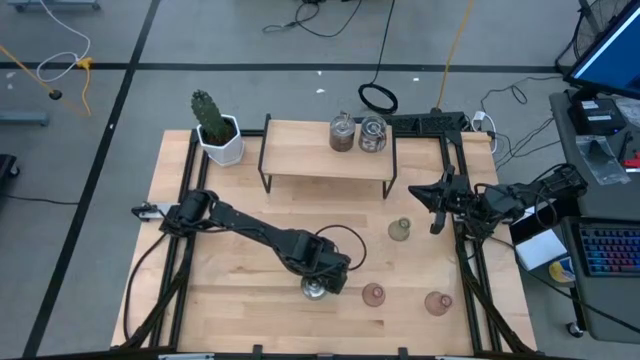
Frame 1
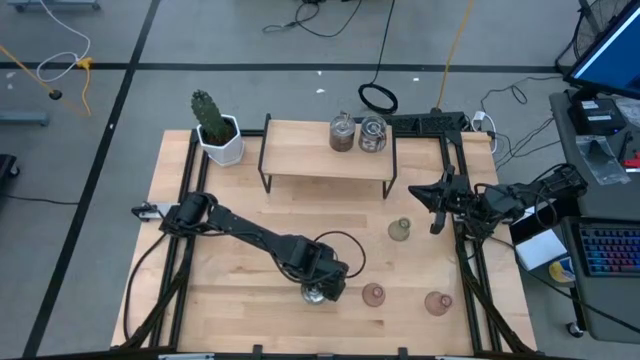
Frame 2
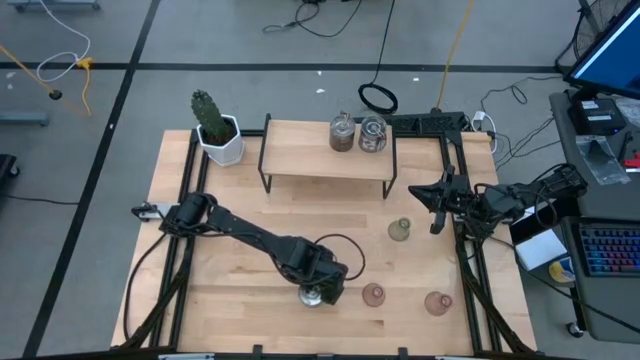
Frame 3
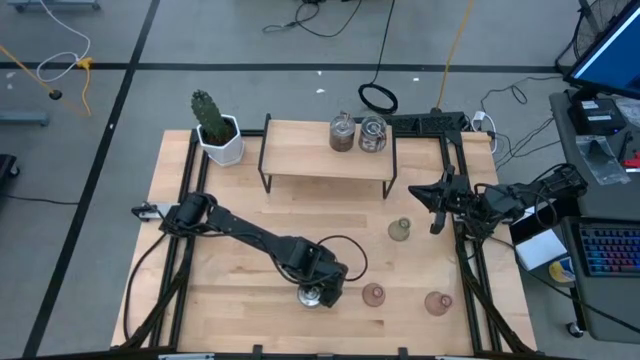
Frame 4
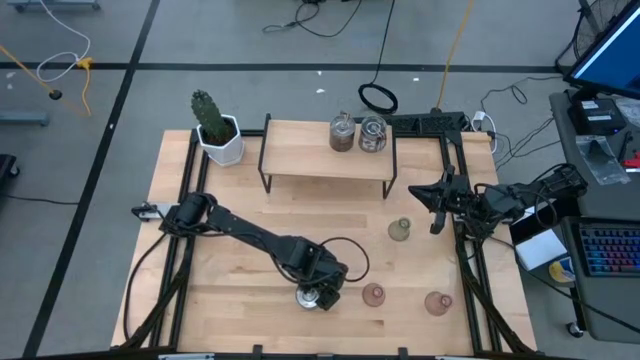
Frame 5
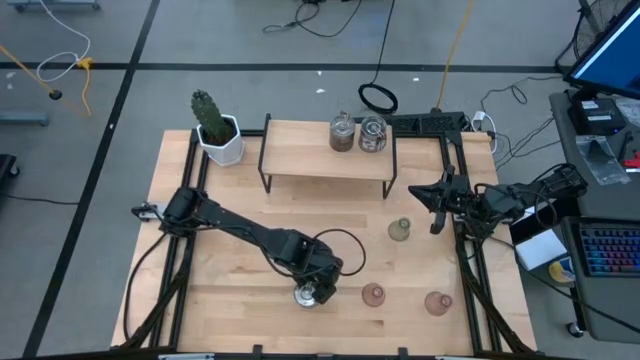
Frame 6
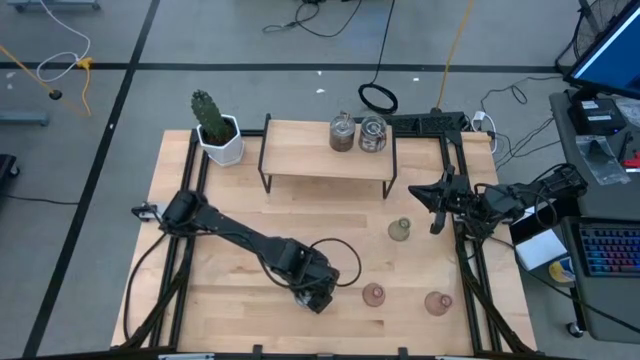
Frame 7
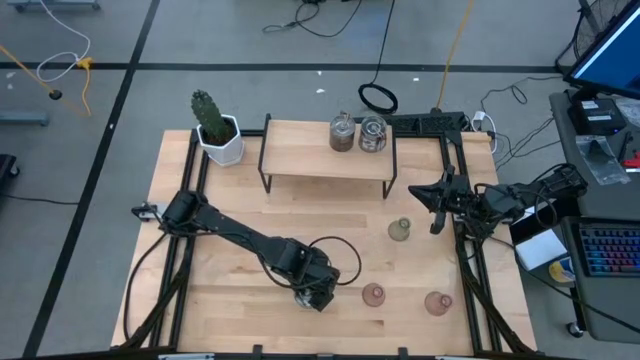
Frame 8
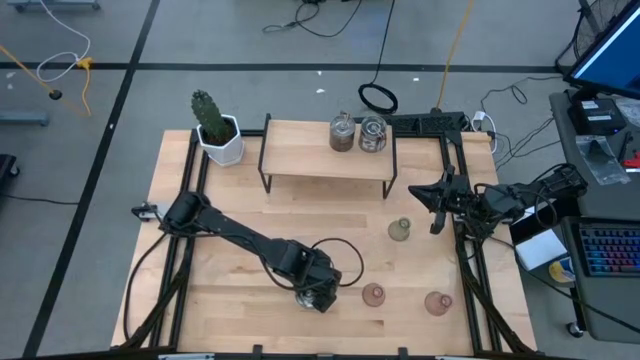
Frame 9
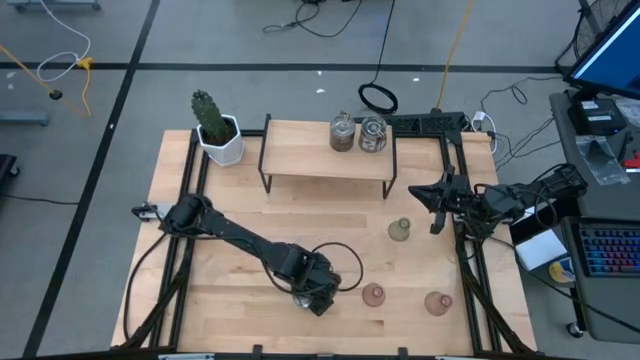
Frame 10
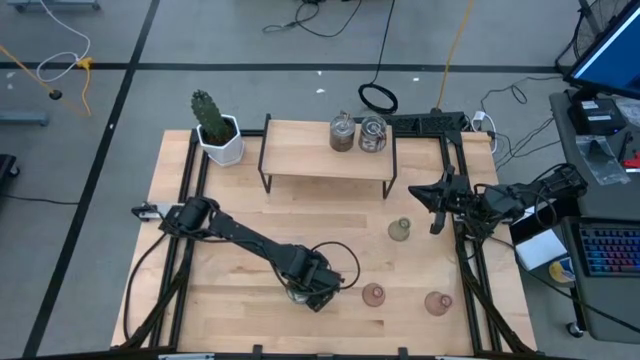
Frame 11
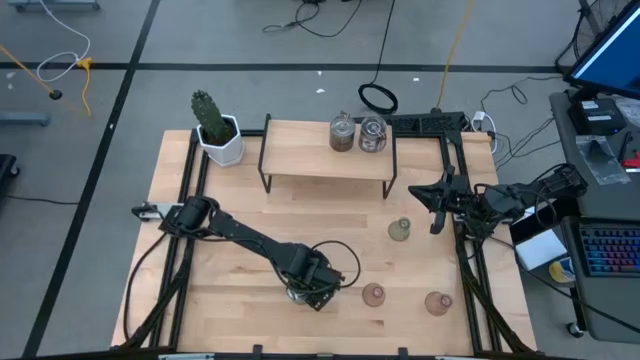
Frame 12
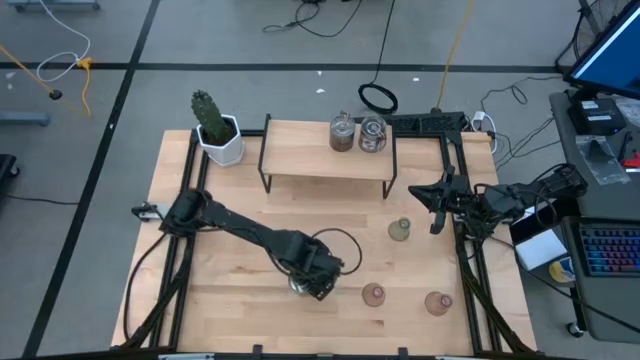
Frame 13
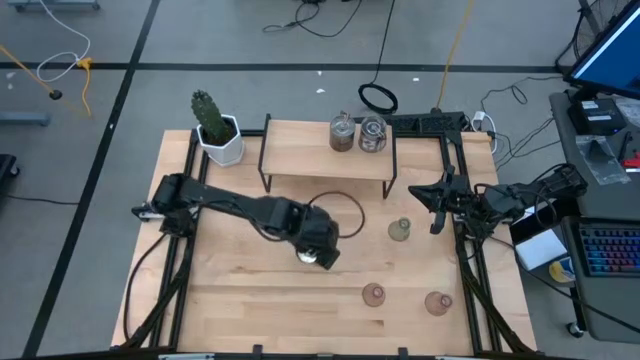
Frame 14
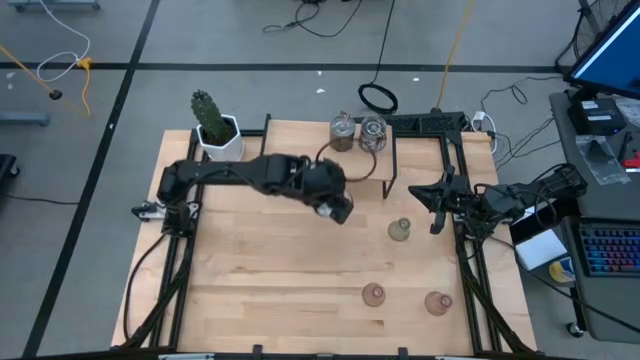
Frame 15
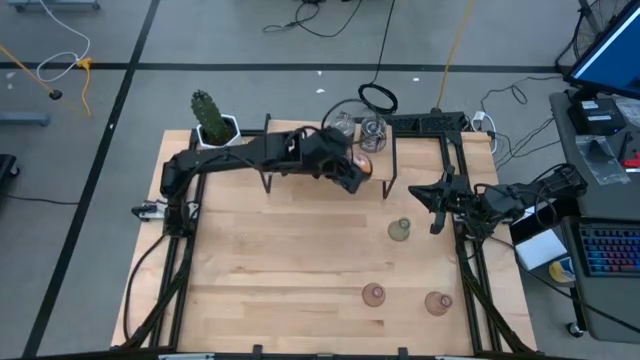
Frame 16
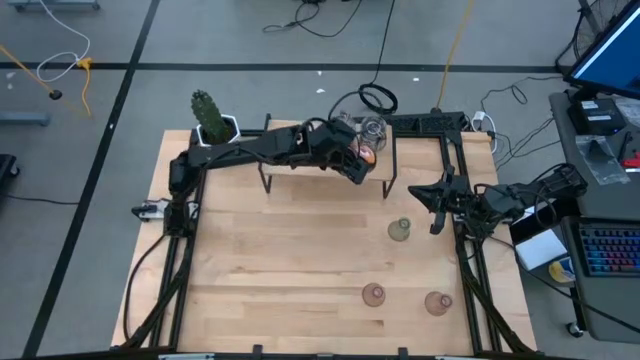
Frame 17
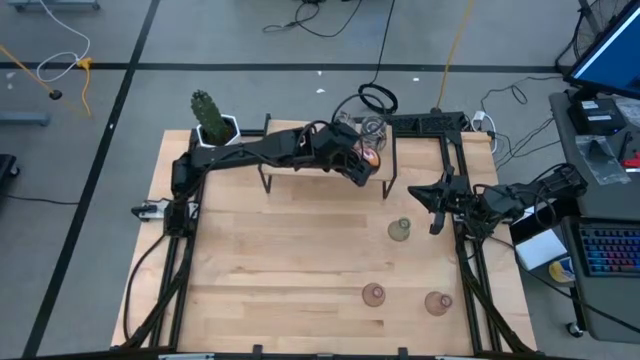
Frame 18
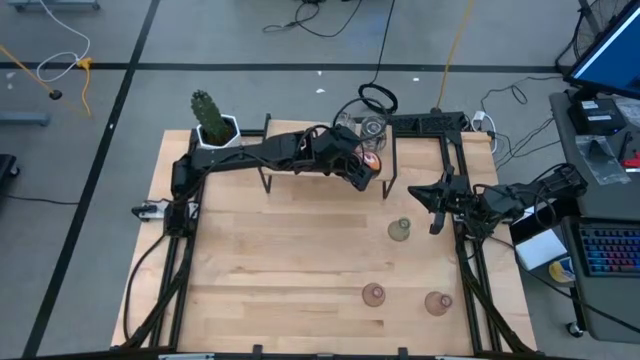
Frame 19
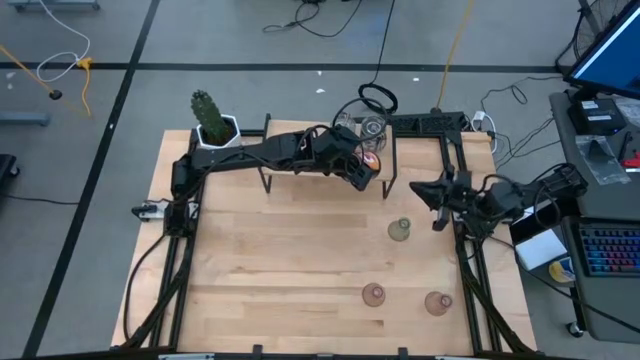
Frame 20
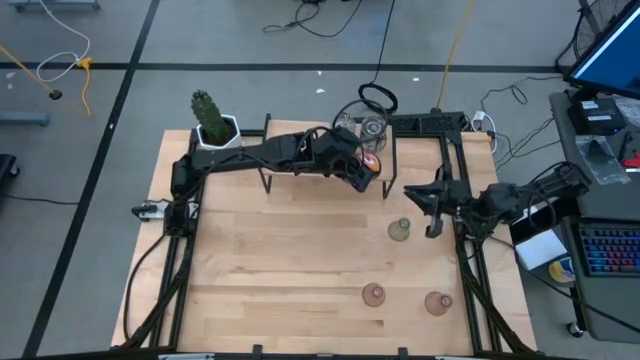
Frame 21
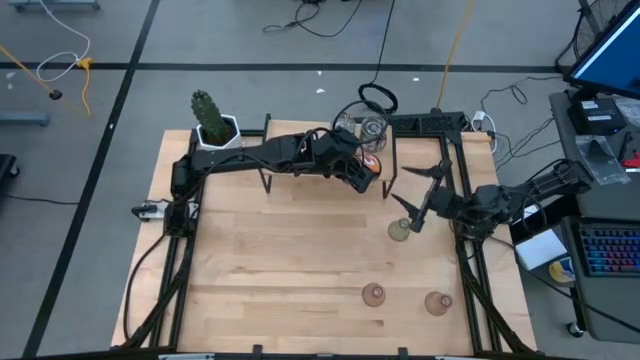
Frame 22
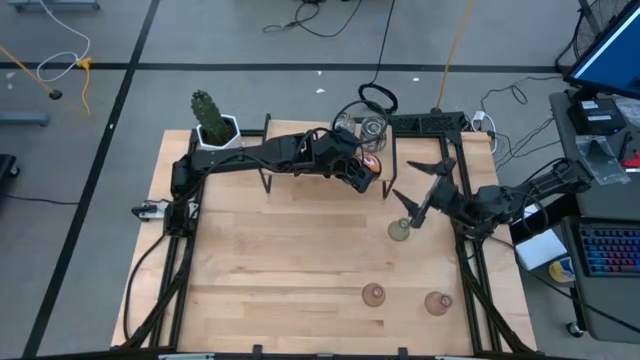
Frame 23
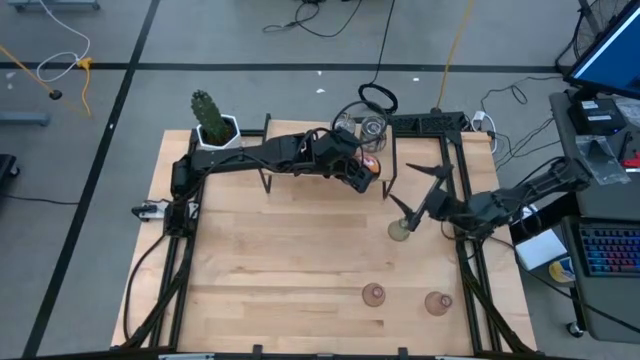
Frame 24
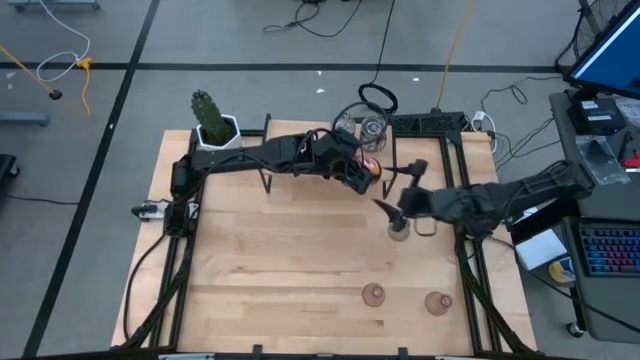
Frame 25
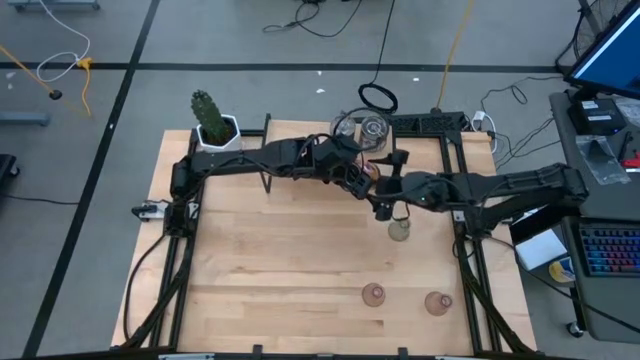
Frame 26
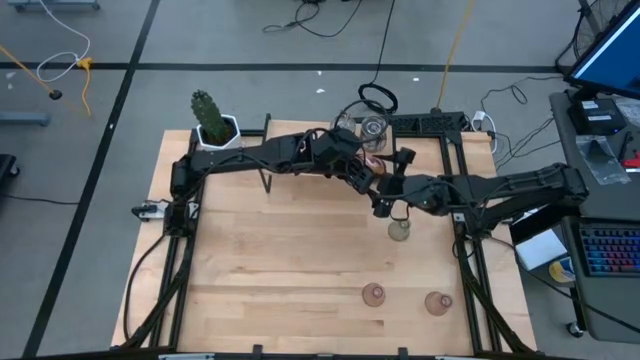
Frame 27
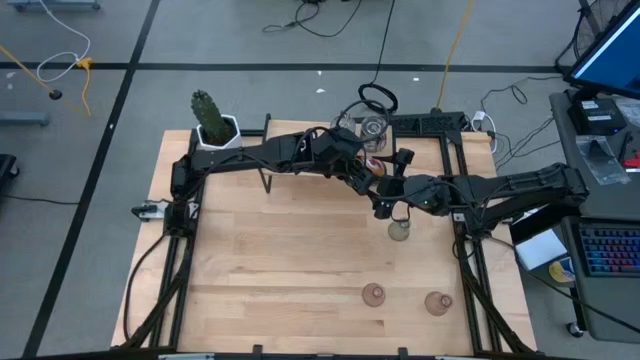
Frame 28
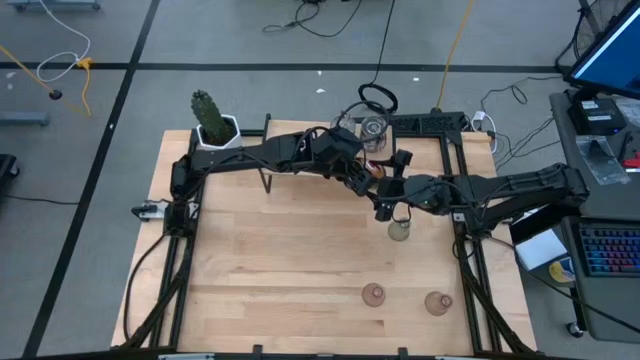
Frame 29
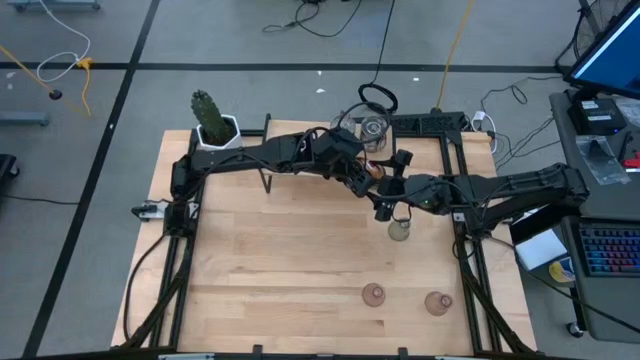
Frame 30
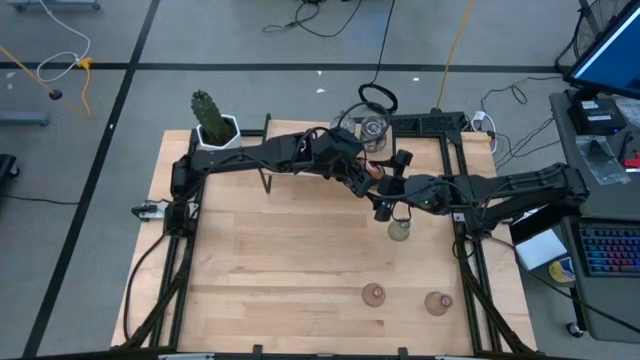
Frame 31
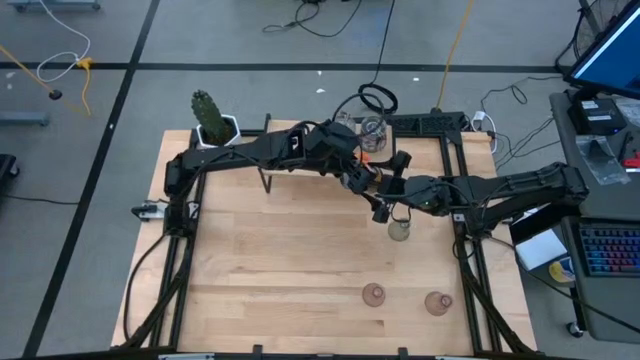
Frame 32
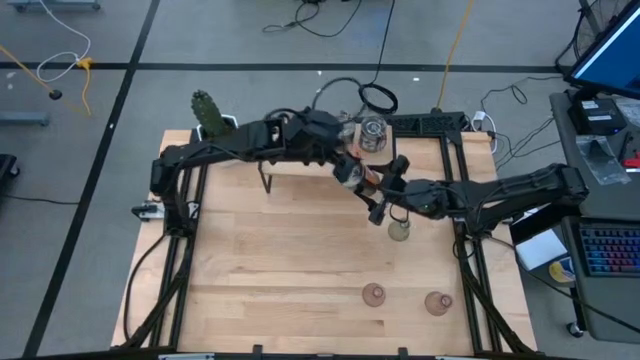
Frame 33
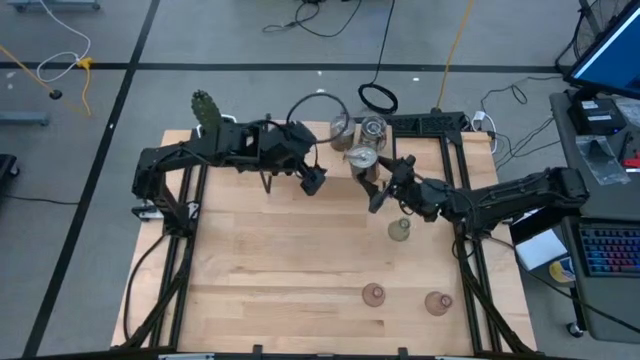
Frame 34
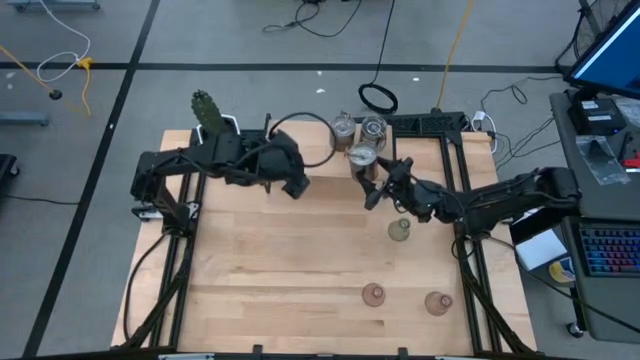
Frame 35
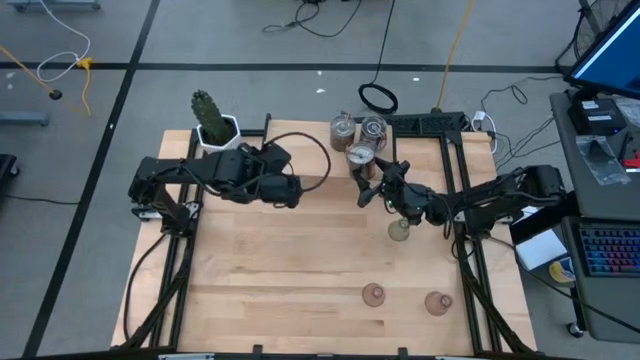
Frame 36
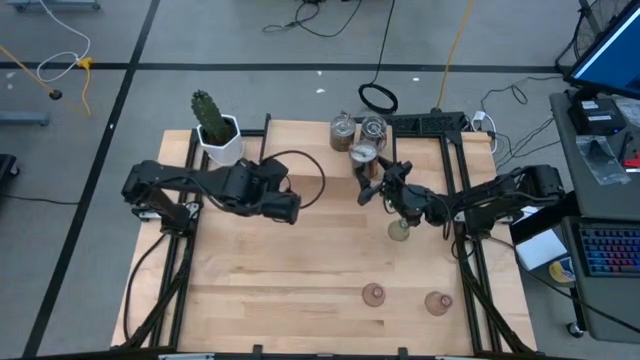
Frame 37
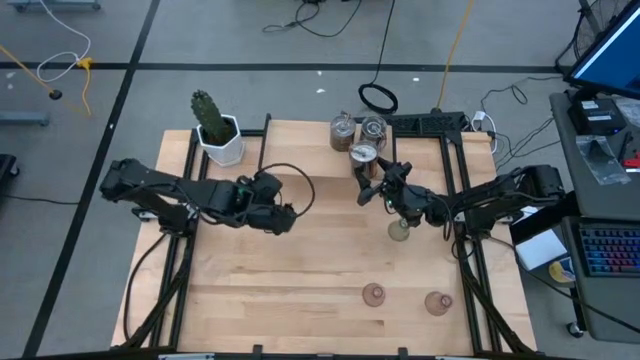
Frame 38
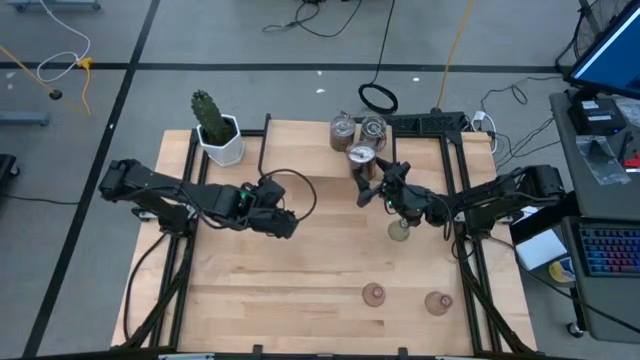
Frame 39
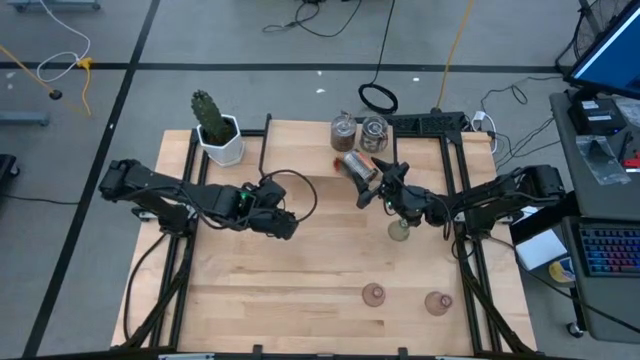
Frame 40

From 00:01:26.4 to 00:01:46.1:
Task: Pick & Place candle stick holders
Put the silver scented candle on the shelf

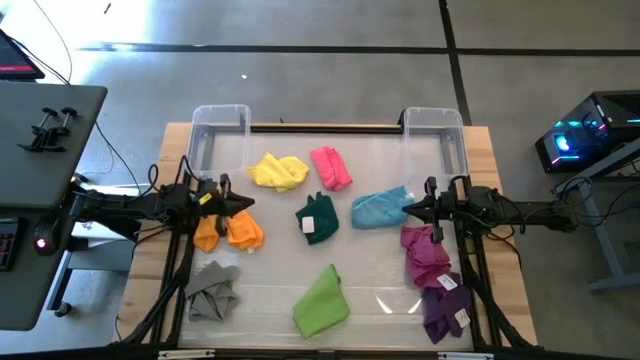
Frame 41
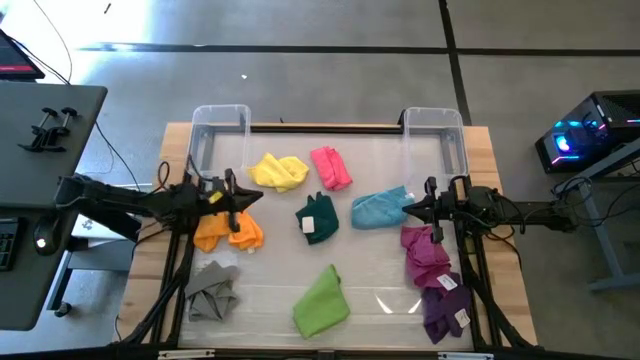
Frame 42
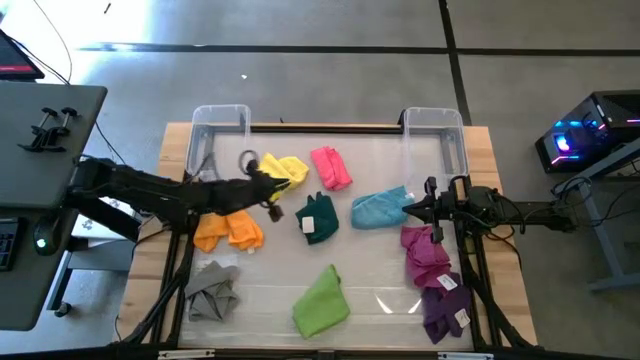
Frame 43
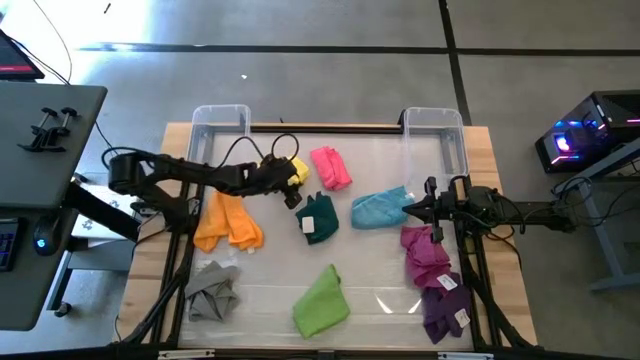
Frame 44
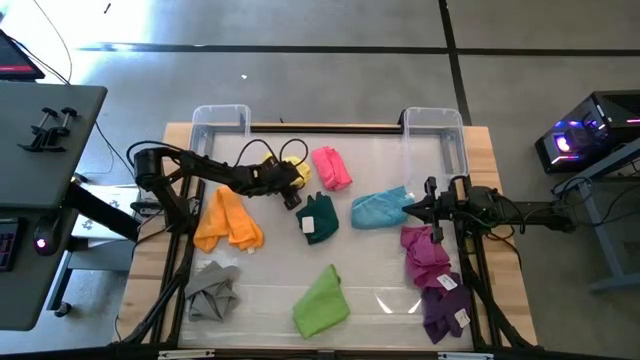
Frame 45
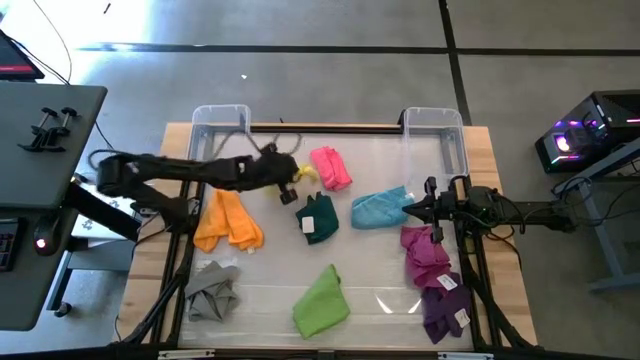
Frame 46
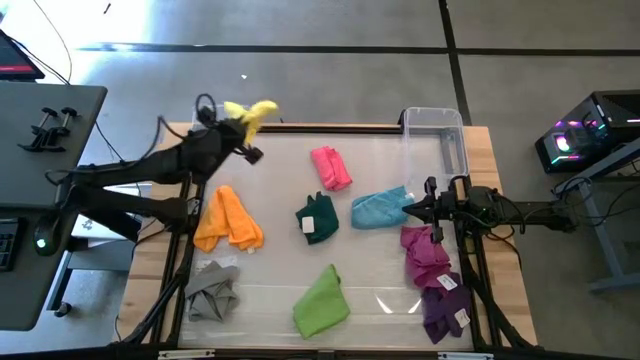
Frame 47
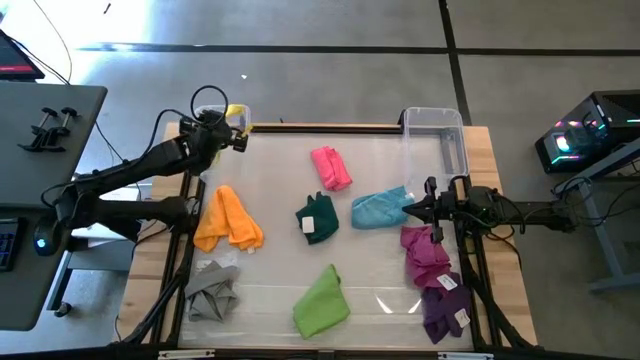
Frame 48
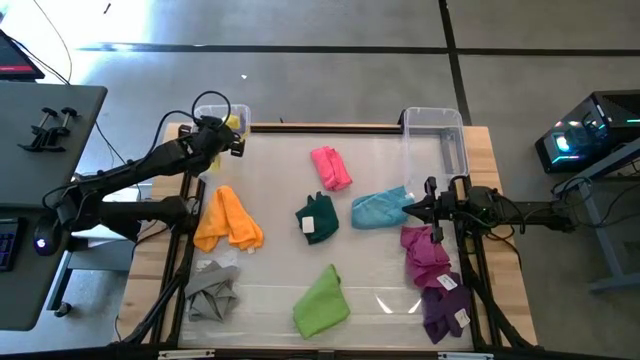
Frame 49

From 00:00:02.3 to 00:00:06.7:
Task: Sort towels by color in basket
Put the yellow towel into the left transparent bin
